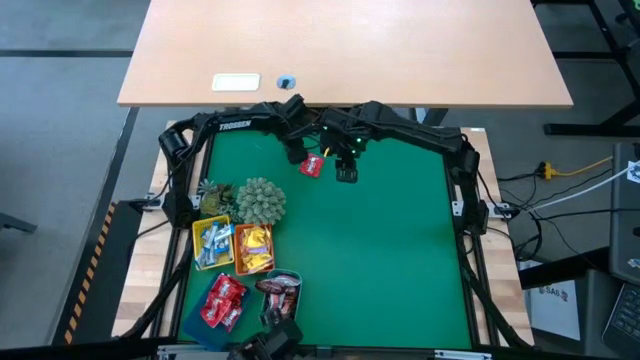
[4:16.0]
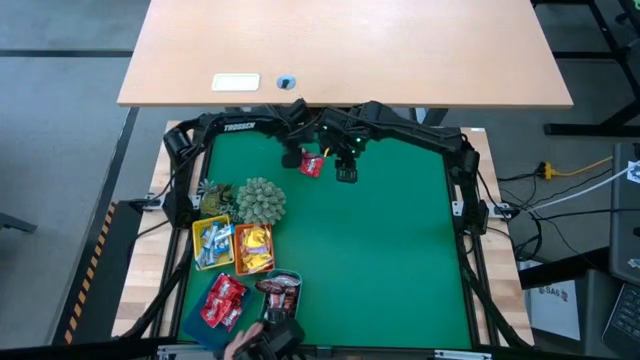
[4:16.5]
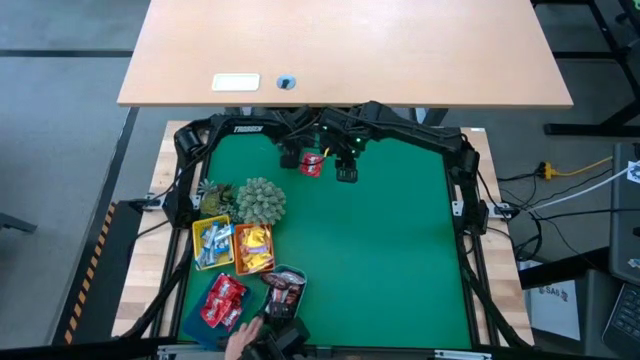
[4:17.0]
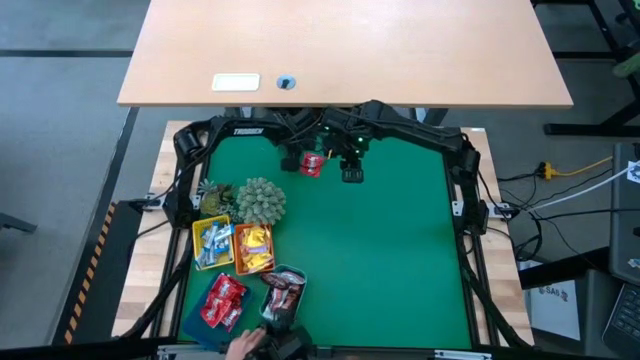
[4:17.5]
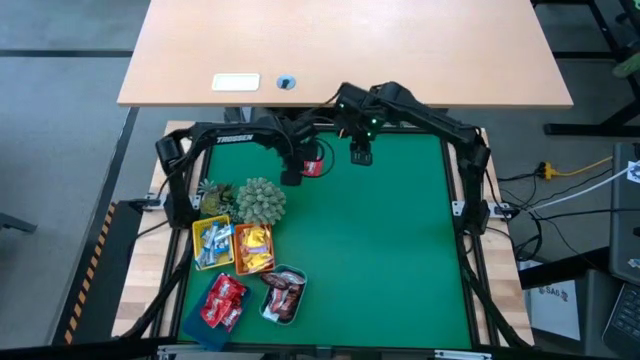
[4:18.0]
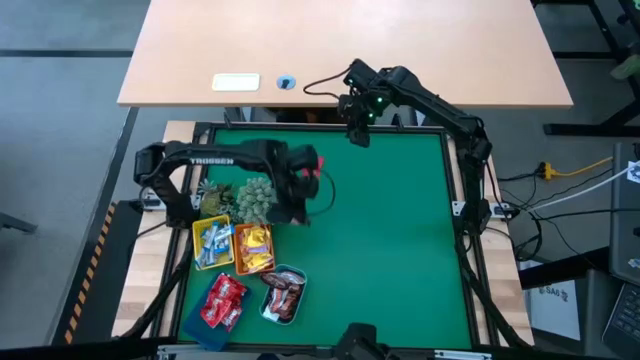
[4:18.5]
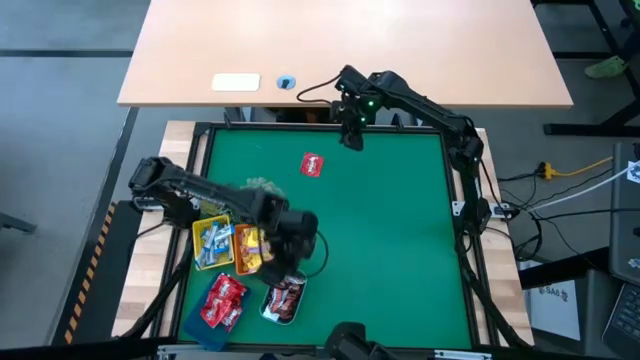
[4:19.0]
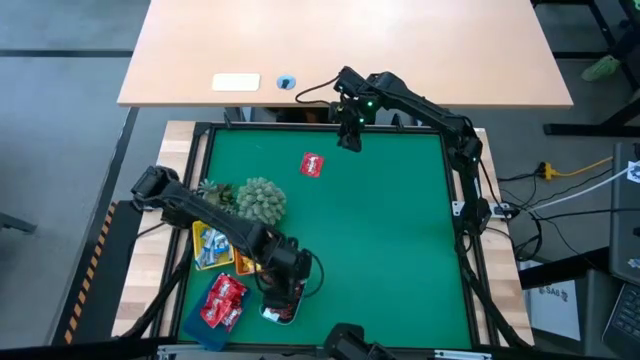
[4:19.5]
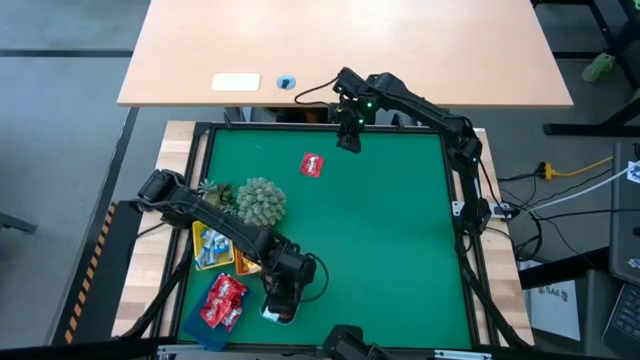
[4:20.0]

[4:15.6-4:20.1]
Task: Sort candy
Put the brown chocolate into the green basket

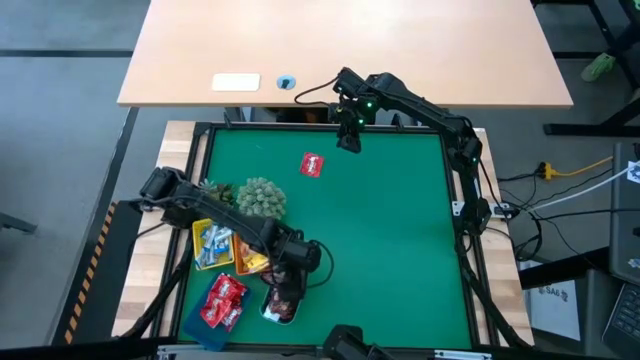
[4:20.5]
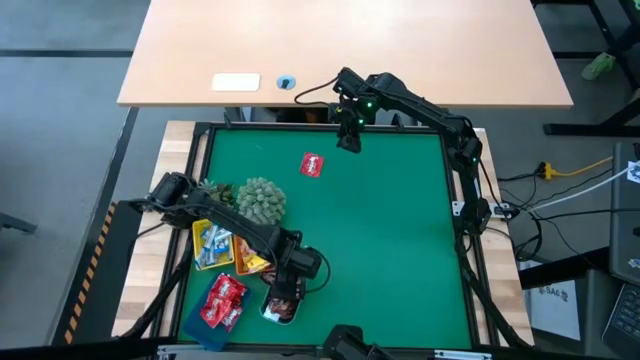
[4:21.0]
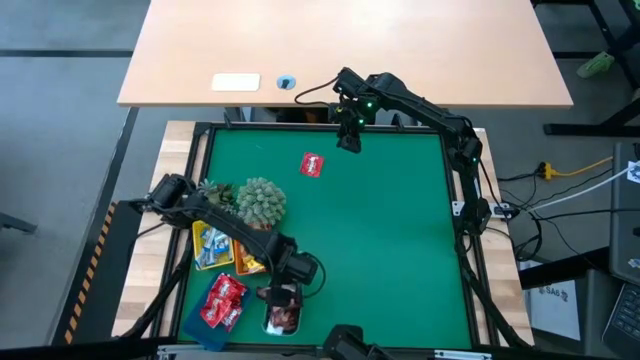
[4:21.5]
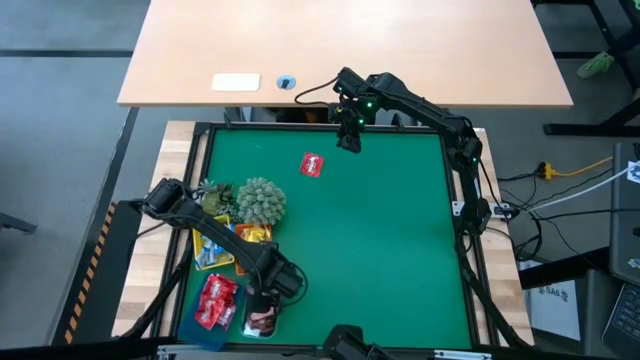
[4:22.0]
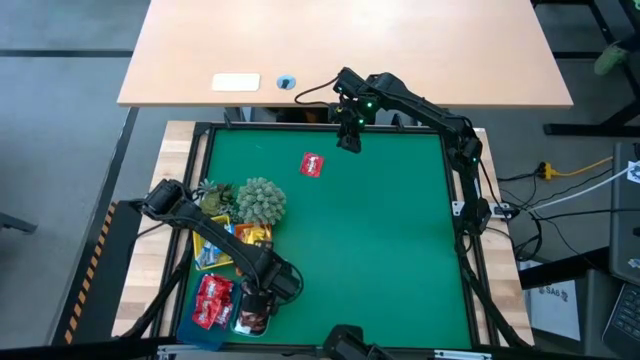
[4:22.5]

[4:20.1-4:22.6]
Adjust the green basket

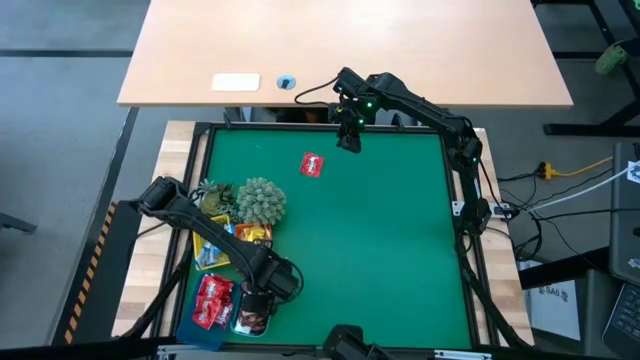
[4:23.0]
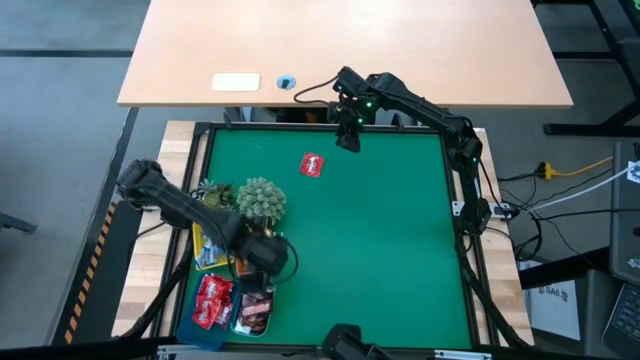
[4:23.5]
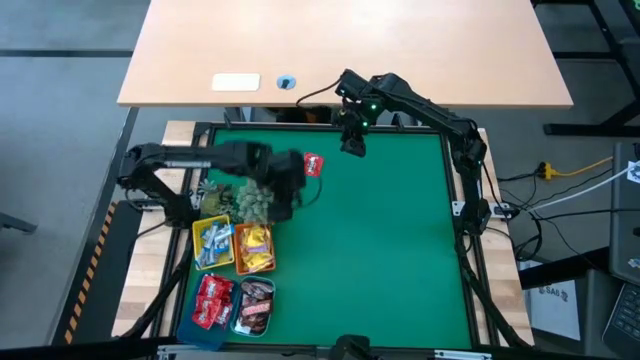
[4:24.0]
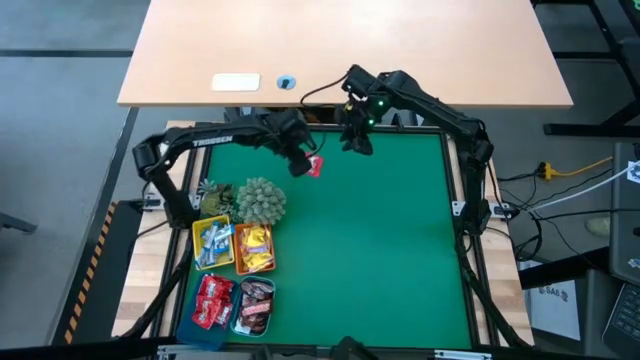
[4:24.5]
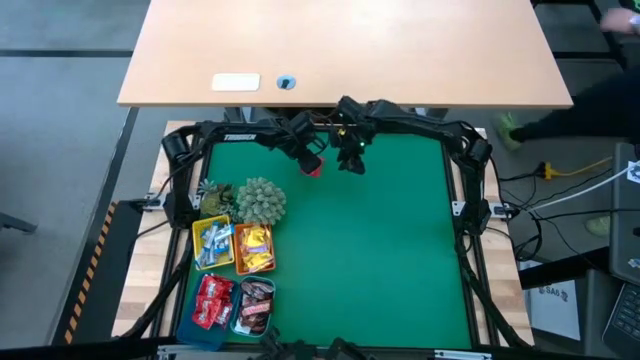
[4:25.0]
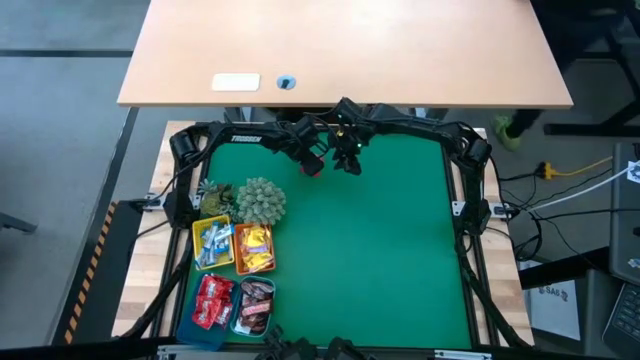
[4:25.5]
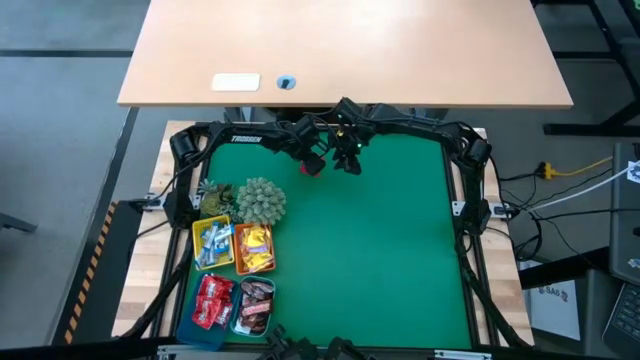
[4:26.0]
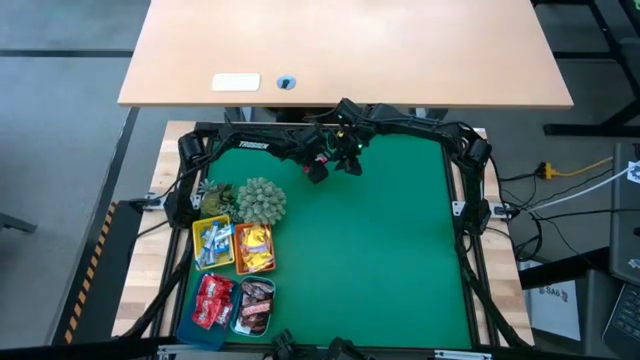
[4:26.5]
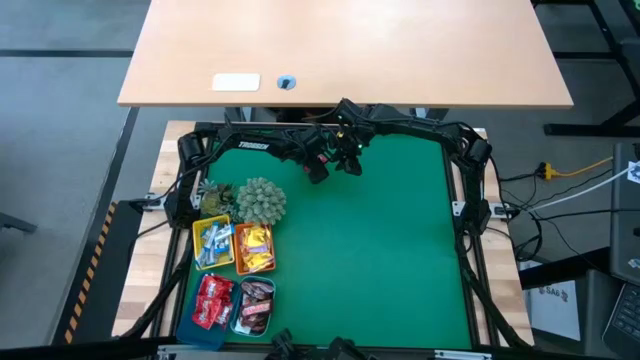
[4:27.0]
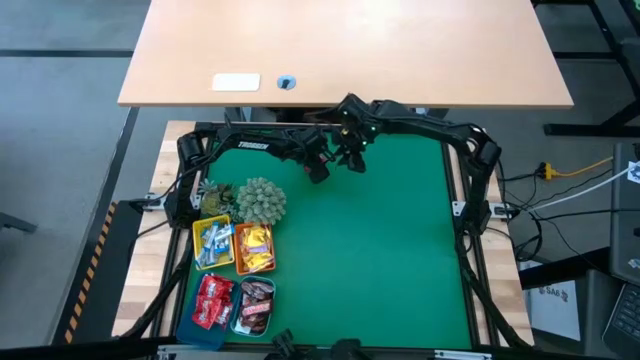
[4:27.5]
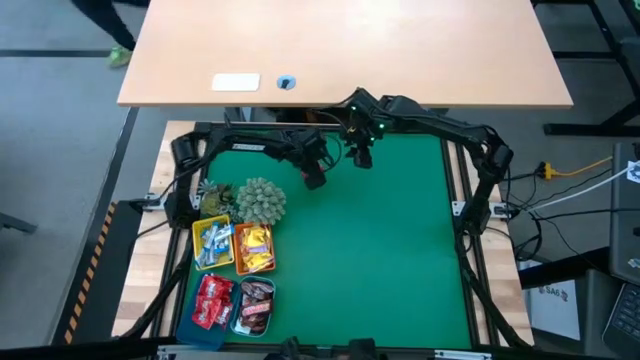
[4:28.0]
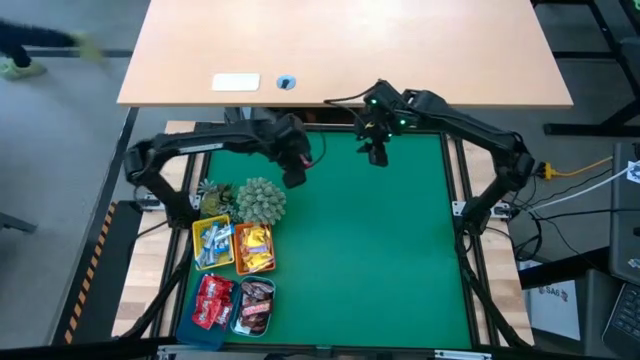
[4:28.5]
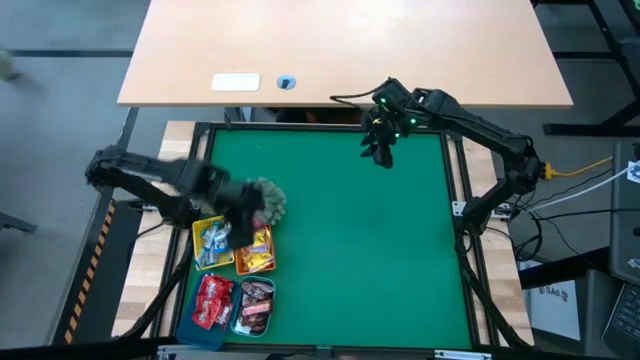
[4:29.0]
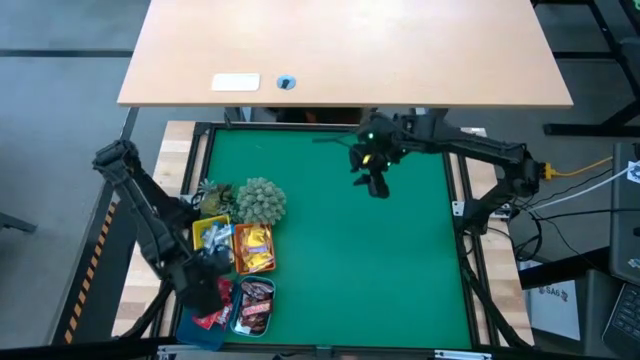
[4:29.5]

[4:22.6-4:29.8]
Put the red chocolate into the blue basket

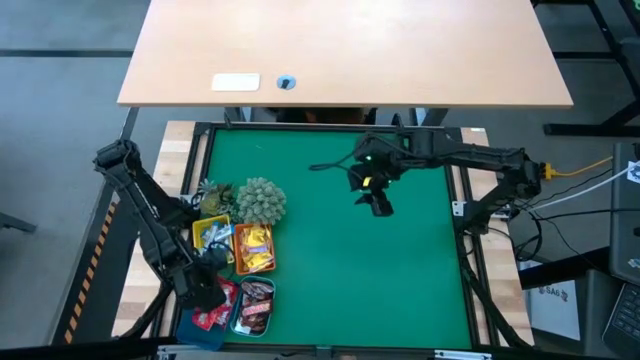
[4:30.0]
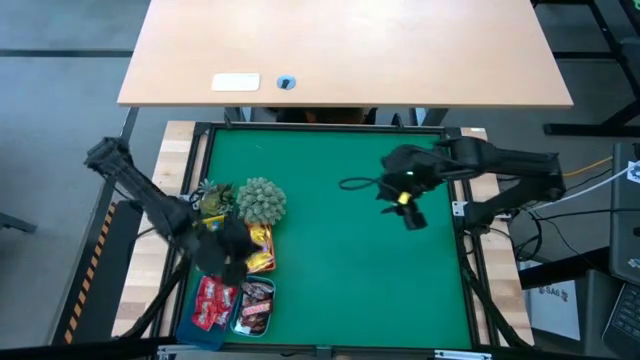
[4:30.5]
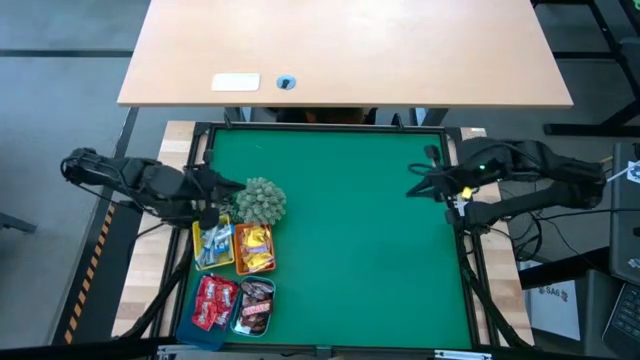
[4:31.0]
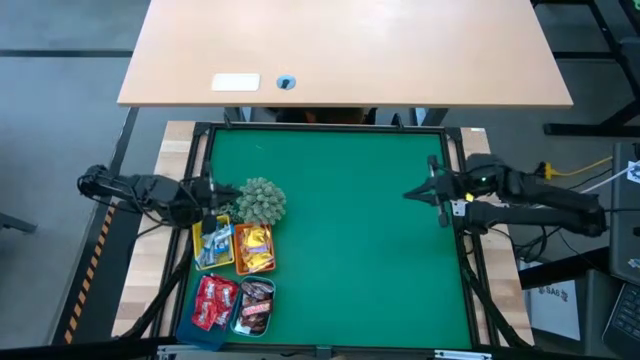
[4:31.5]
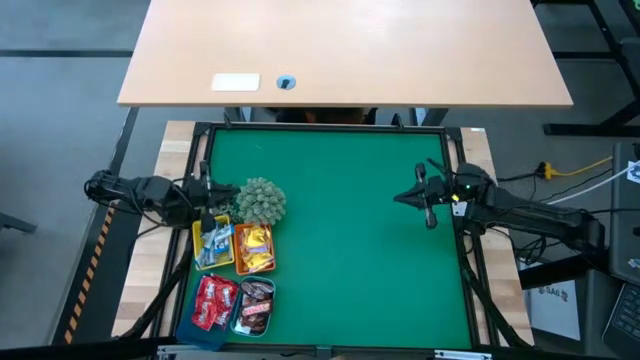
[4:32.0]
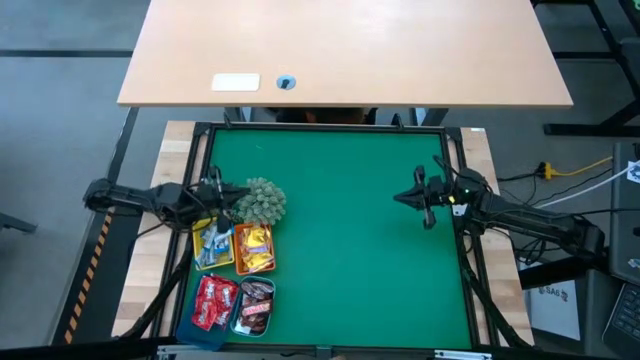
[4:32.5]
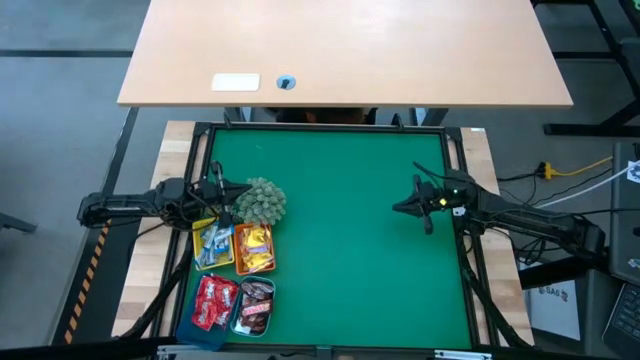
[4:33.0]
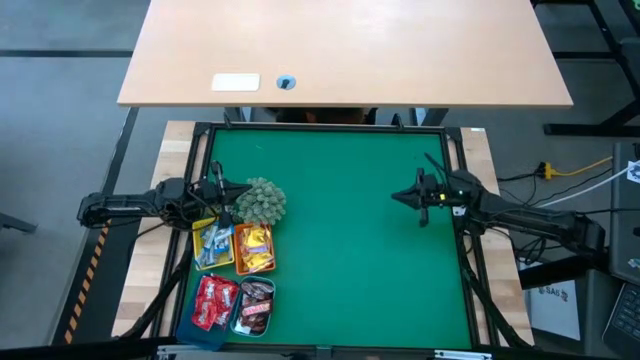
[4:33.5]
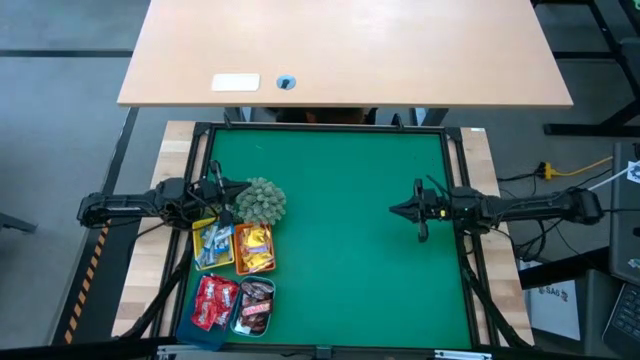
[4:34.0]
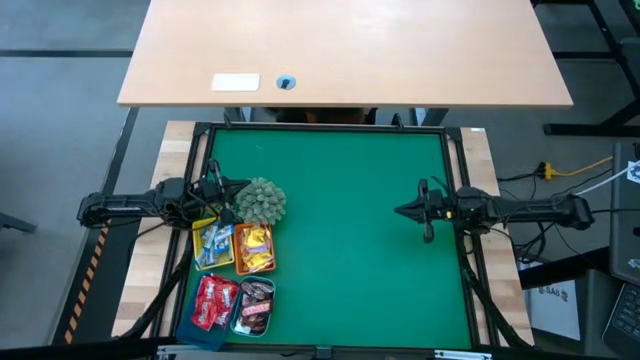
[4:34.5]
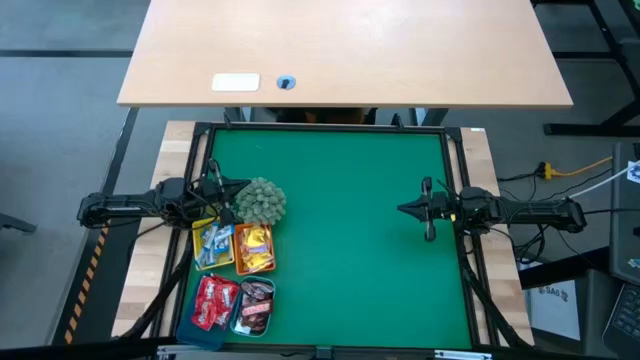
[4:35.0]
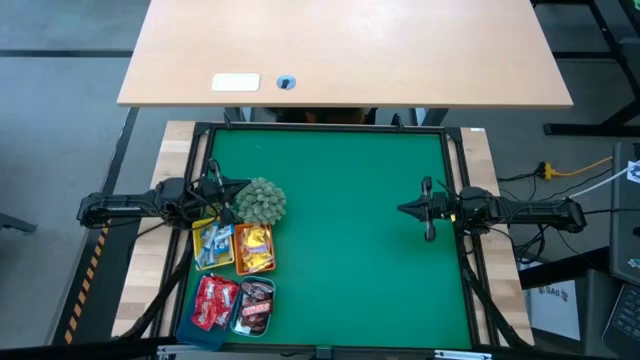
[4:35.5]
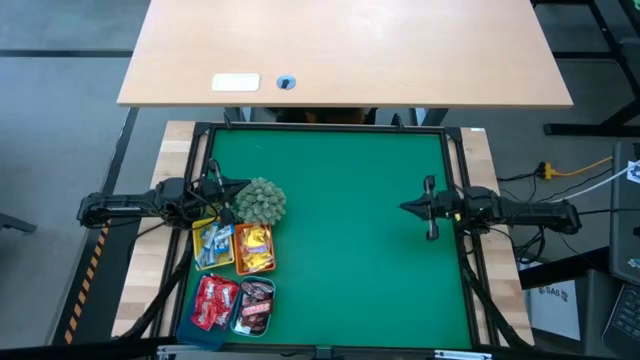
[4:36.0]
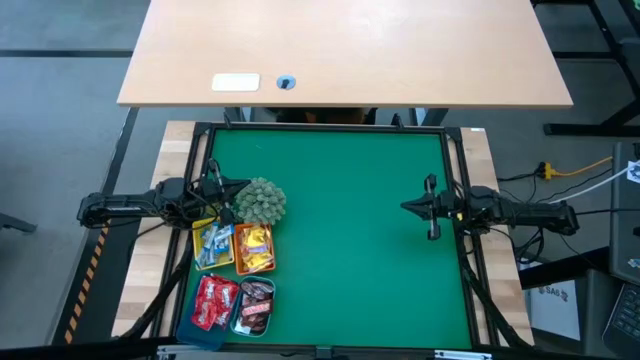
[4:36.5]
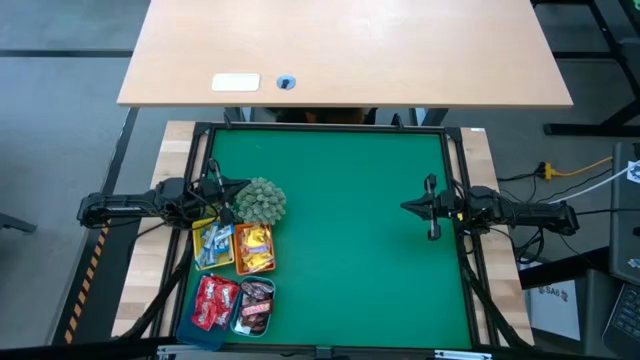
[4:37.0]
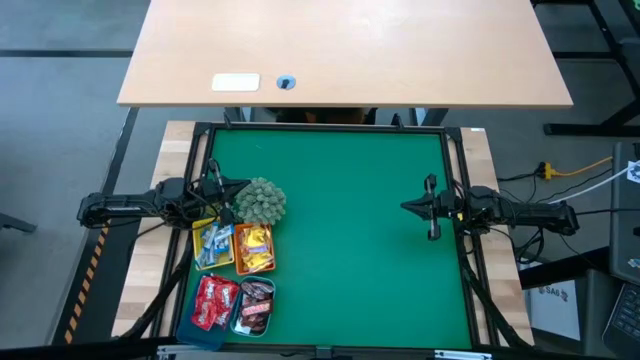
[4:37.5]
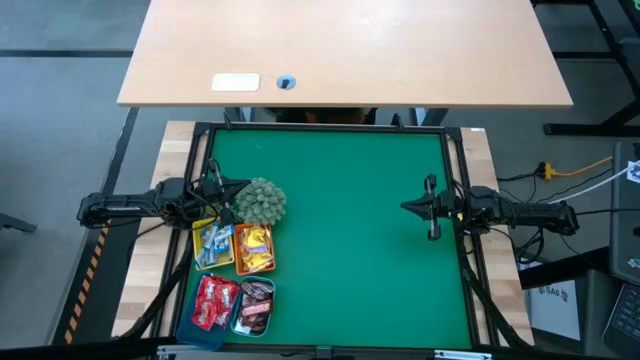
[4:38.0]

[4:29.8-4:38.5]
Return to Home Position
